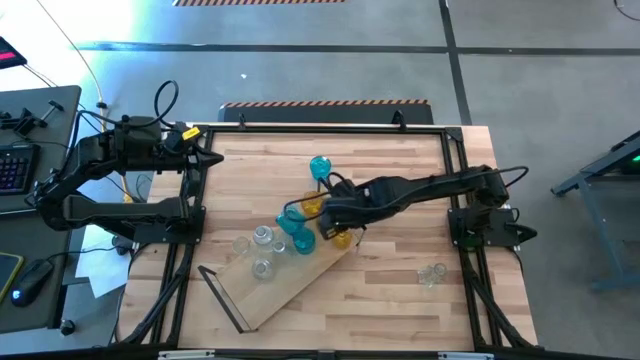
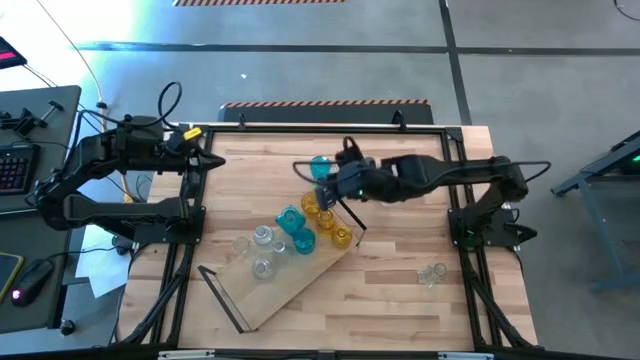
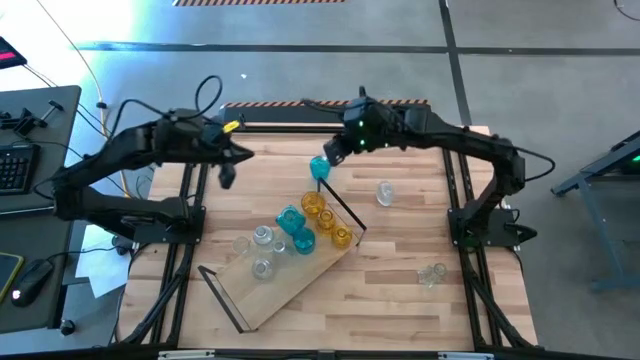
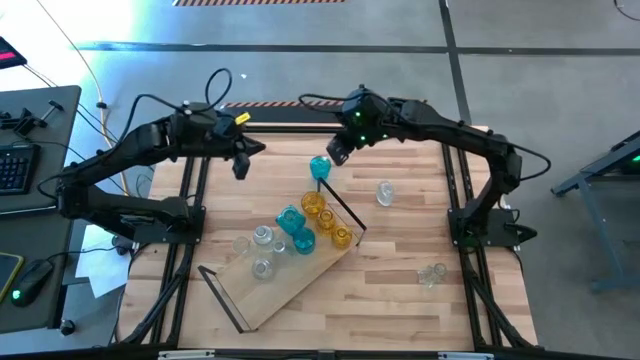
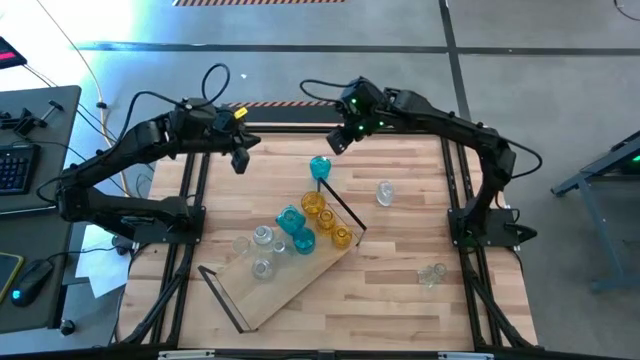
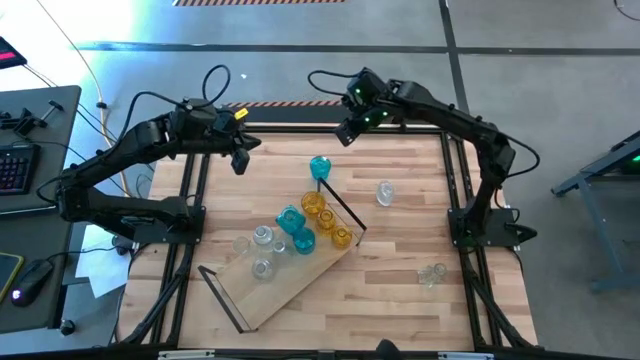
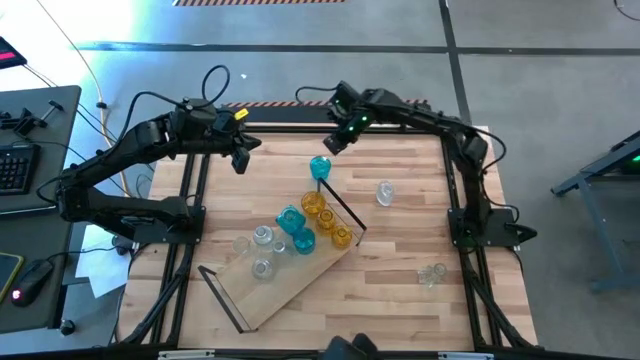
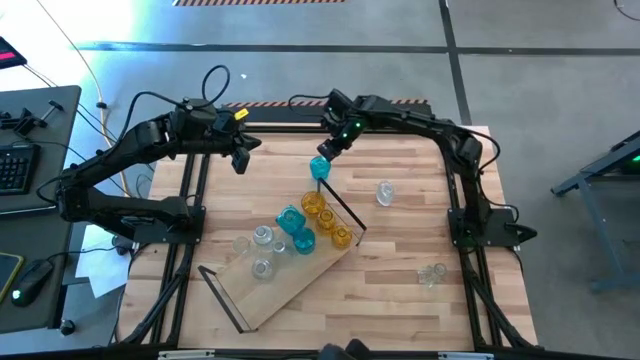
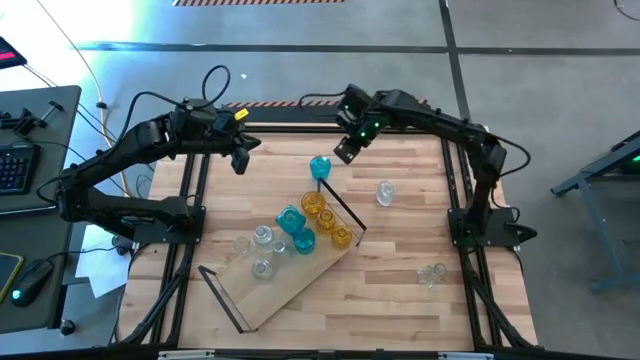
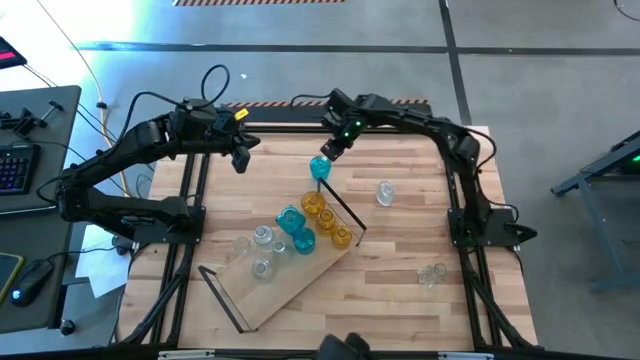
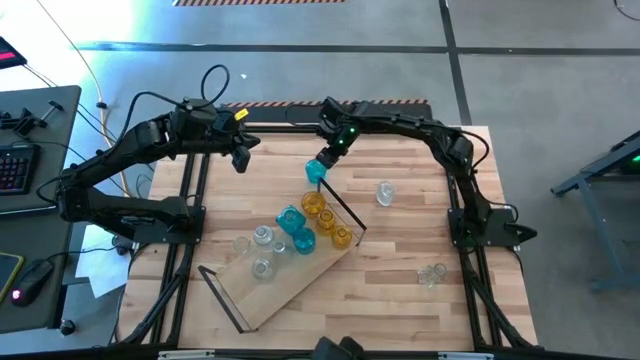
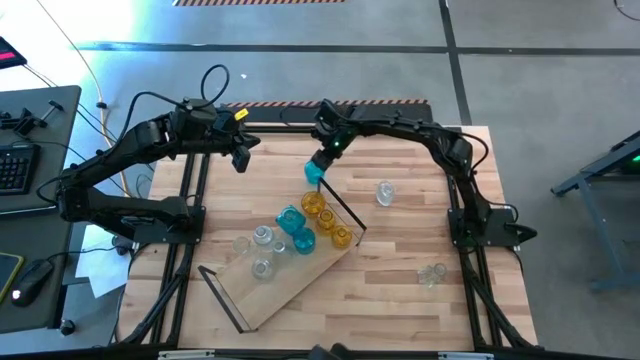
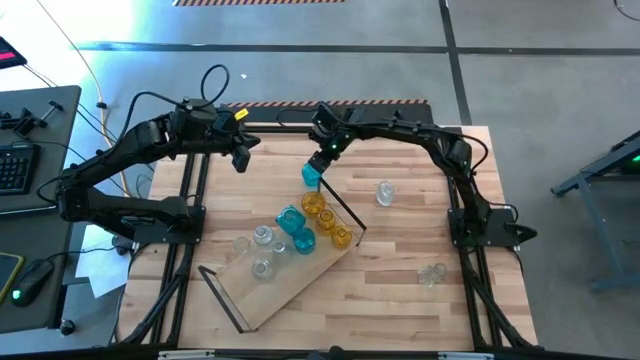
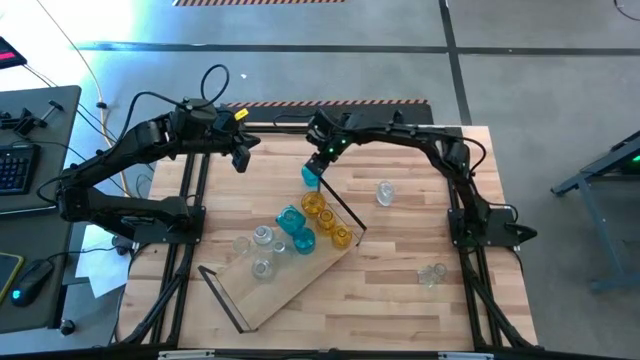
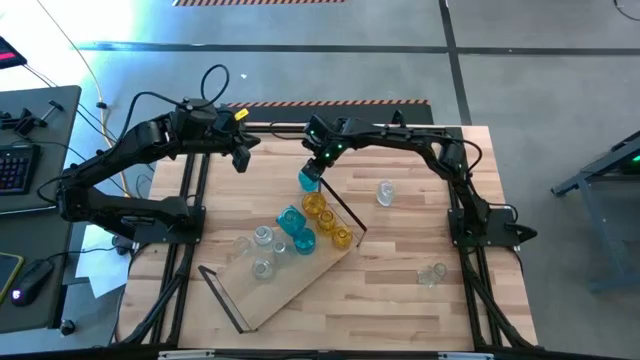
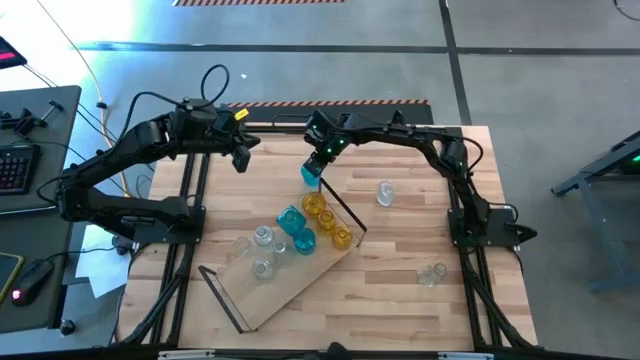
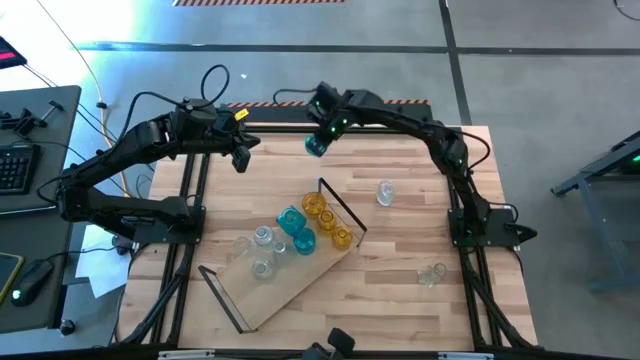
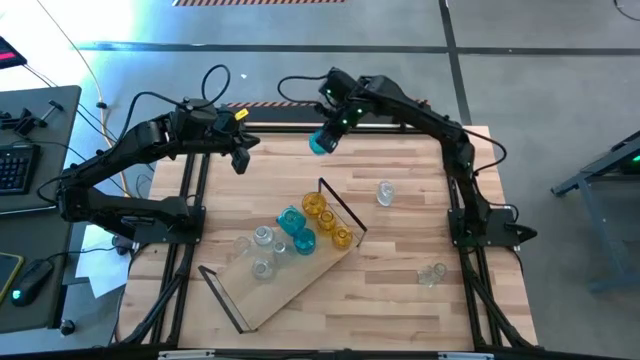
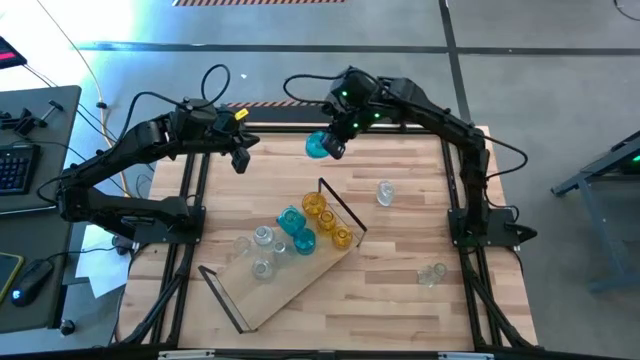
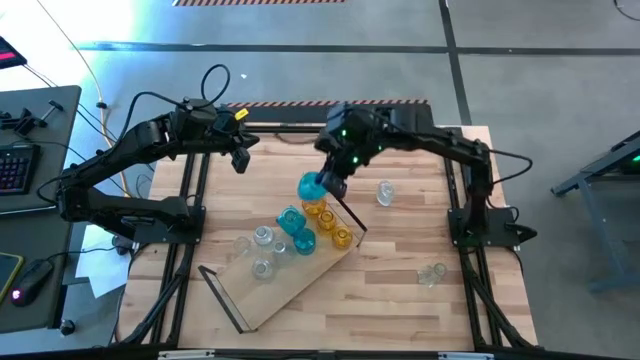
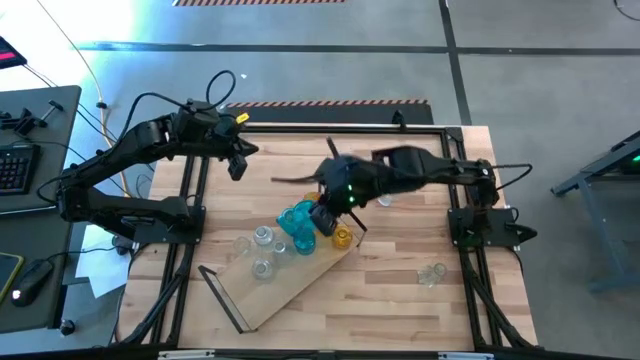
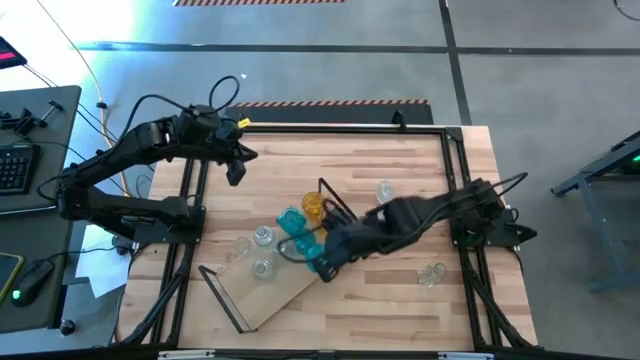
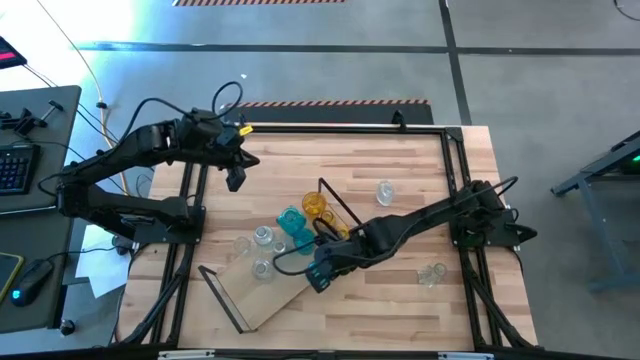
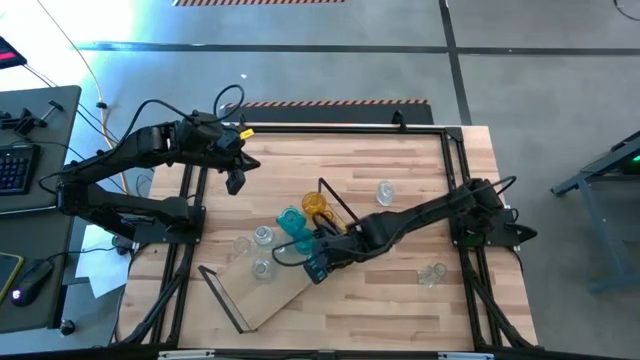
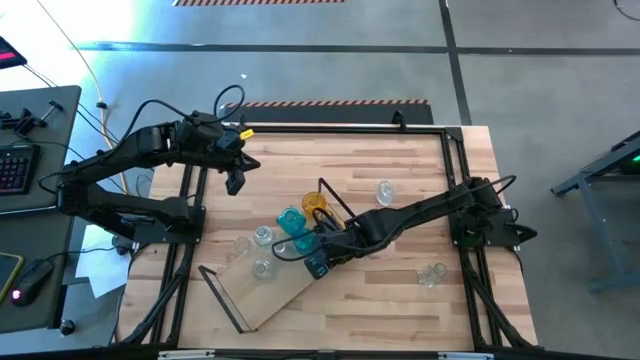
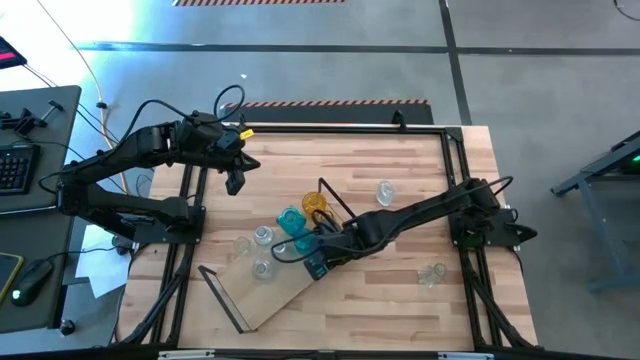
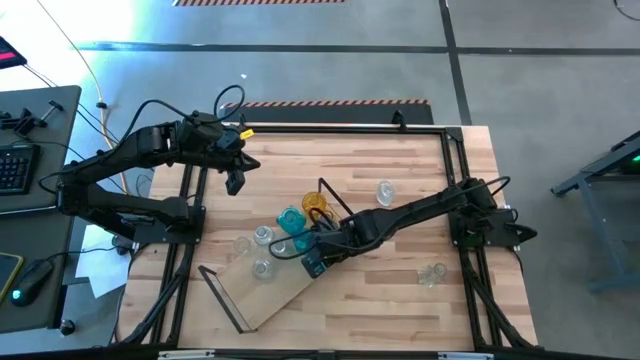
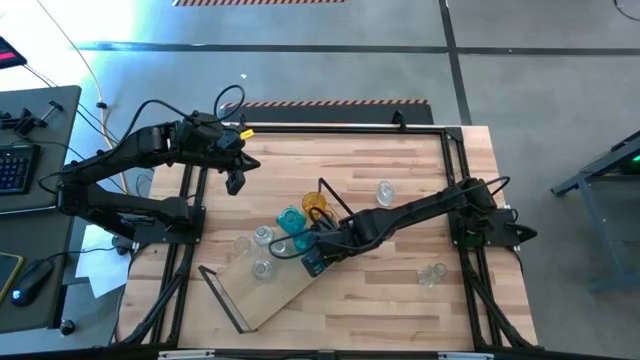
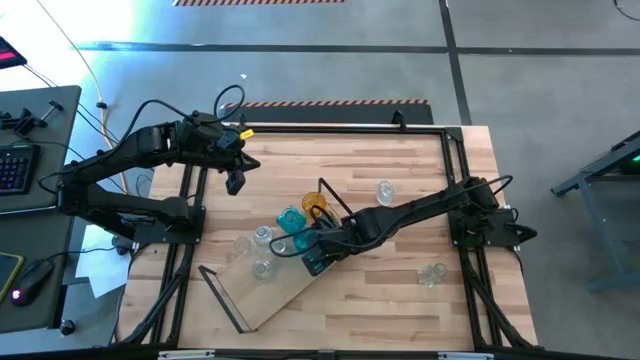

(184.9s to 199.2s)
Task: sort vases onto shelf
Put the blue vase on the shelf aligned with the other blue vases

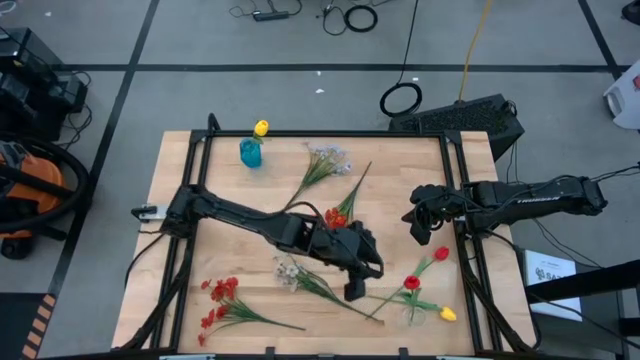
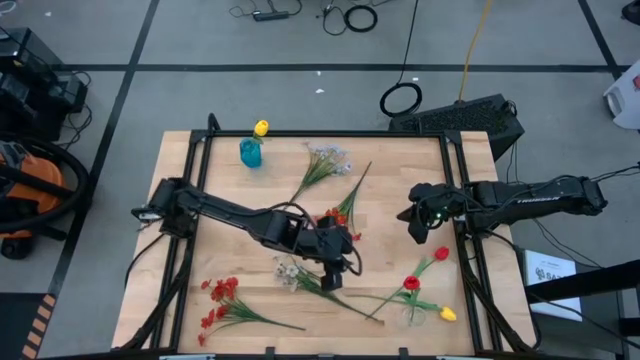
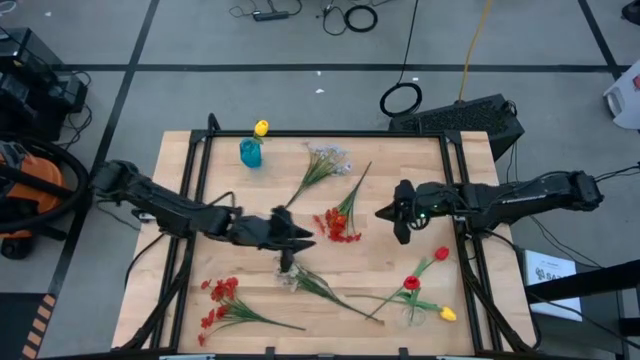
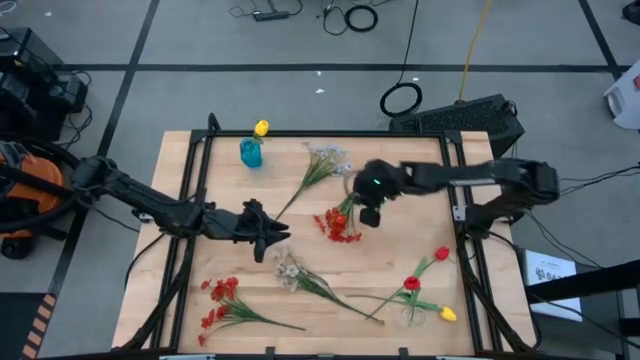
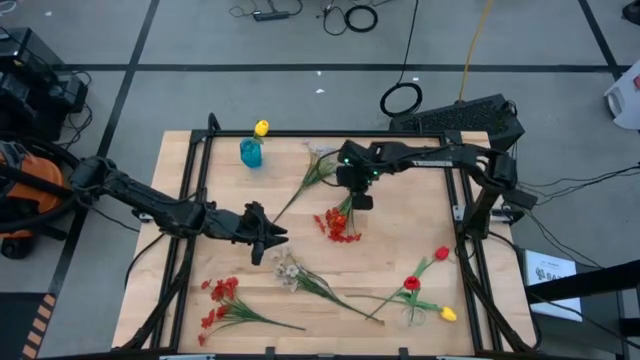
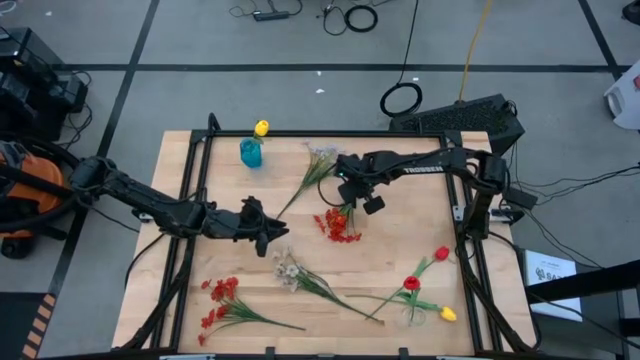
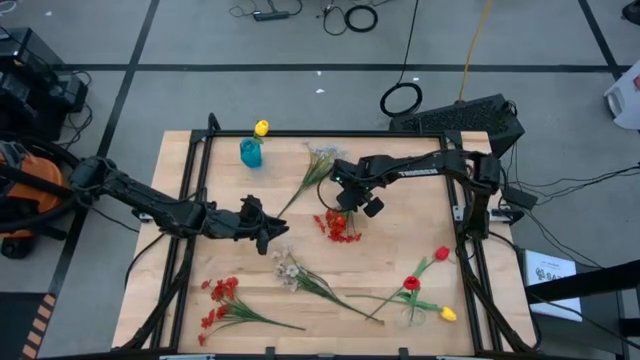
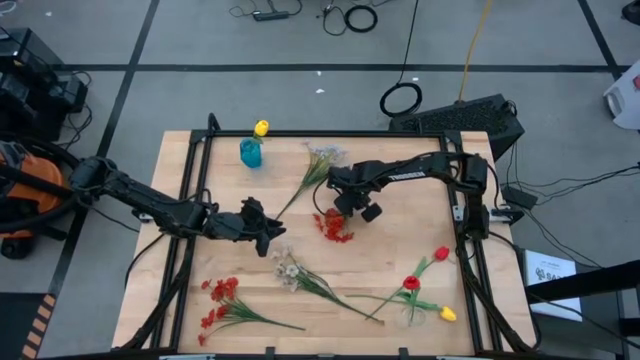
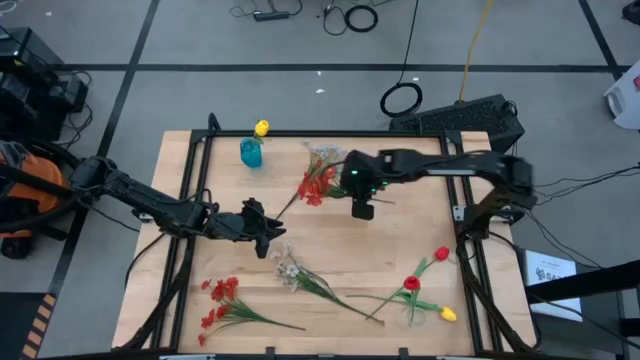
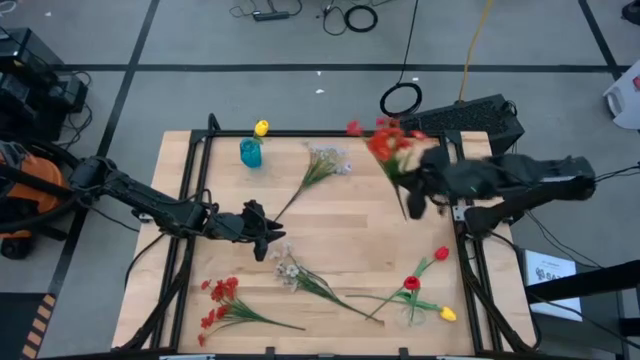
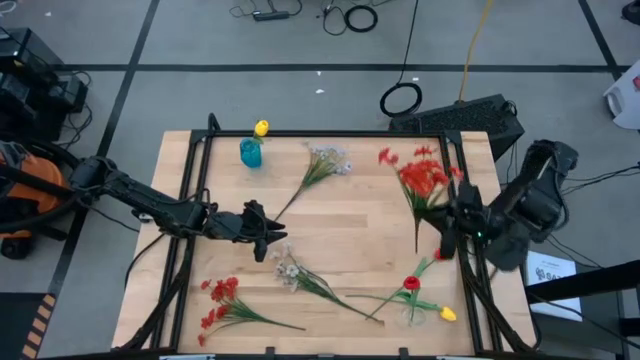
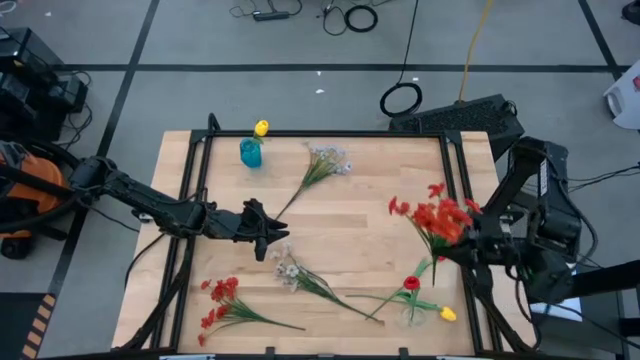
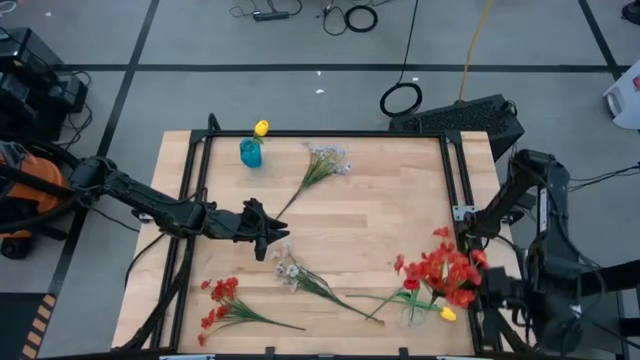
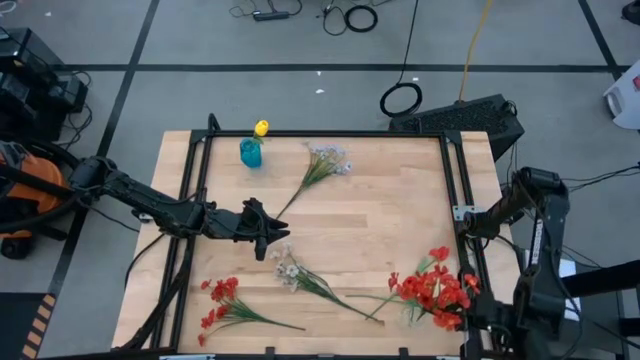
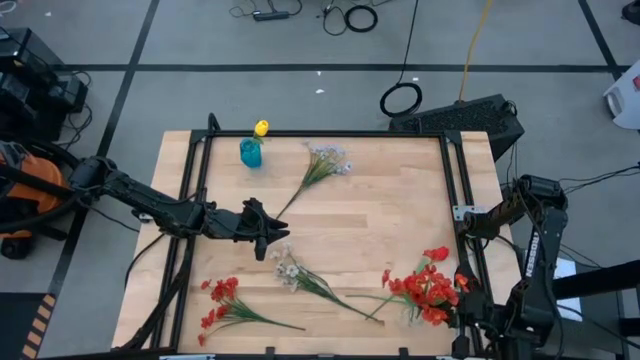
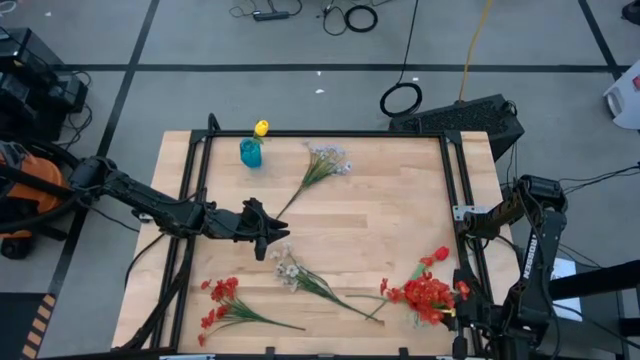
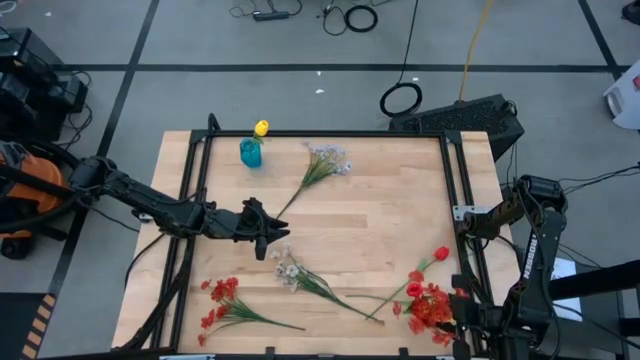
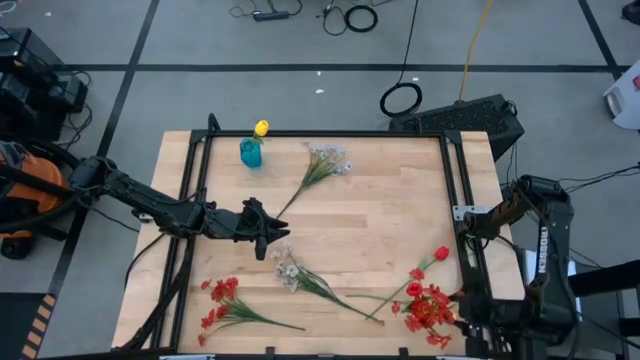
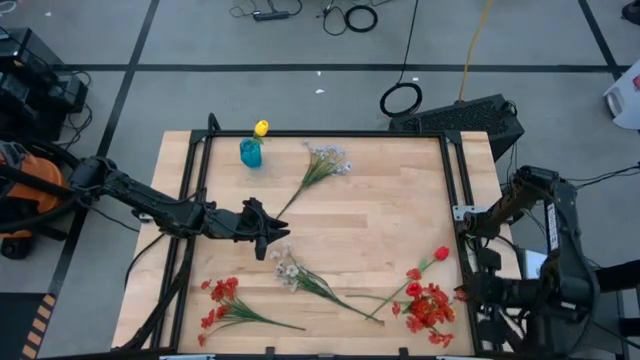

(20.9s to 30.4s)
Task: Sort flowers into vase by color
Put the top orange flowers into the transparent vase
